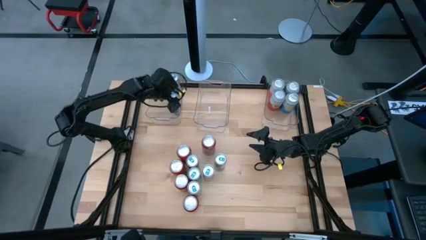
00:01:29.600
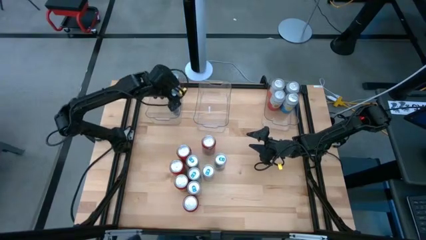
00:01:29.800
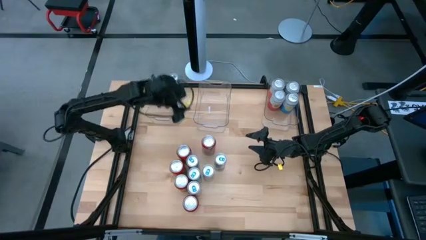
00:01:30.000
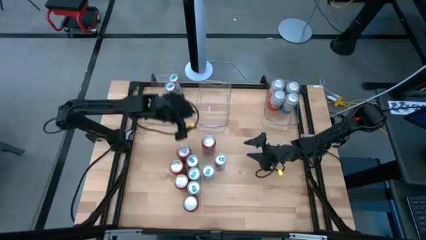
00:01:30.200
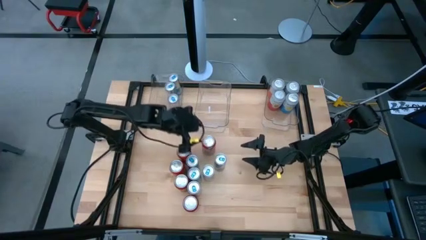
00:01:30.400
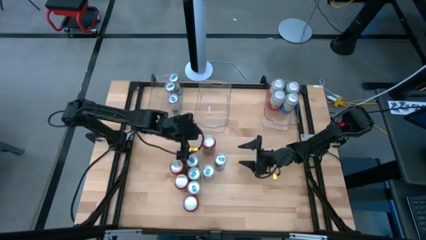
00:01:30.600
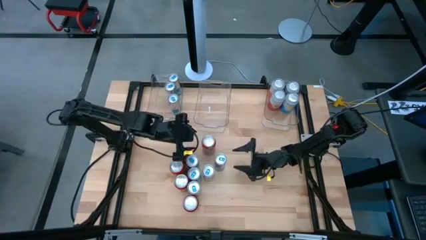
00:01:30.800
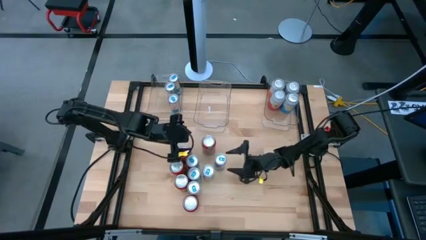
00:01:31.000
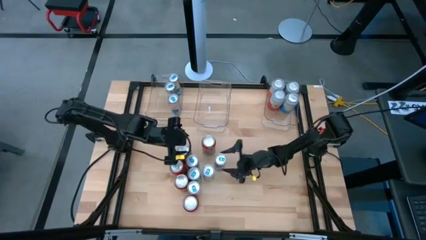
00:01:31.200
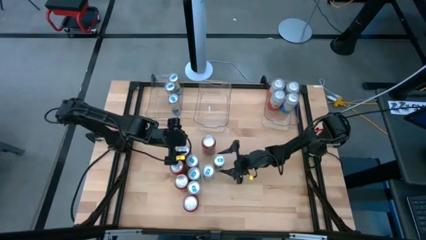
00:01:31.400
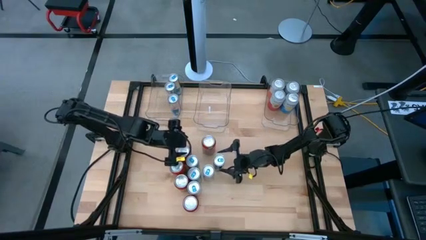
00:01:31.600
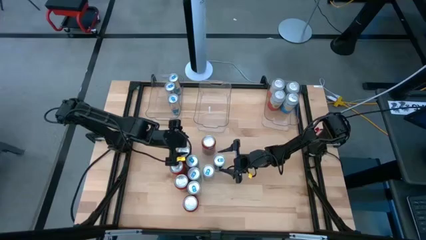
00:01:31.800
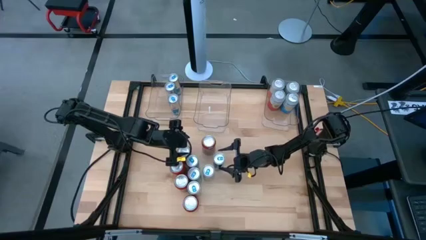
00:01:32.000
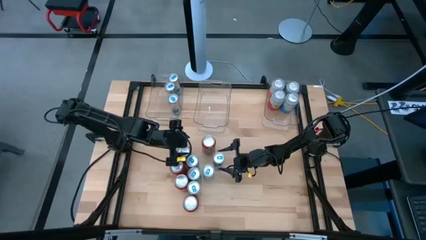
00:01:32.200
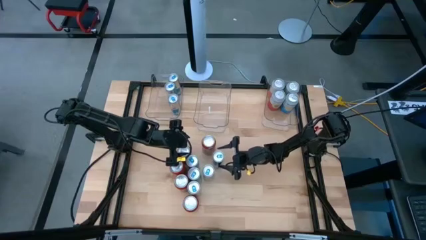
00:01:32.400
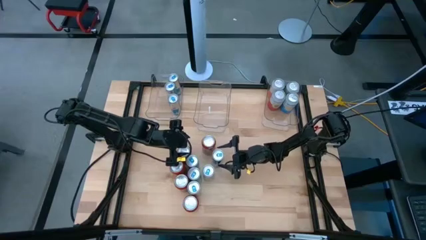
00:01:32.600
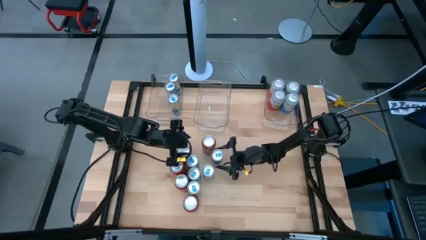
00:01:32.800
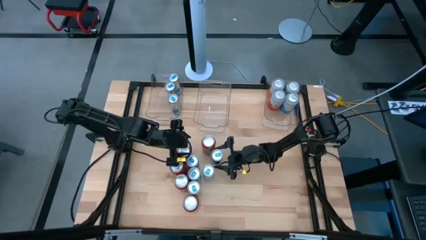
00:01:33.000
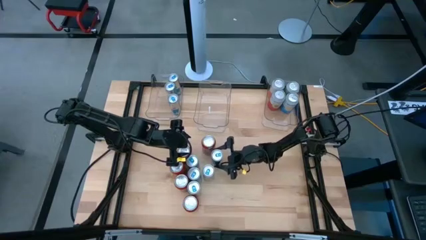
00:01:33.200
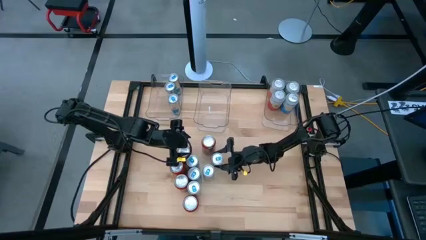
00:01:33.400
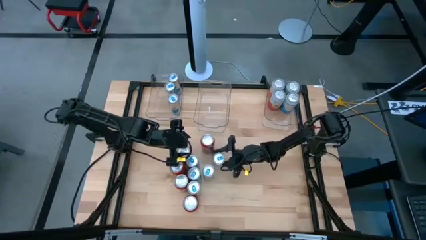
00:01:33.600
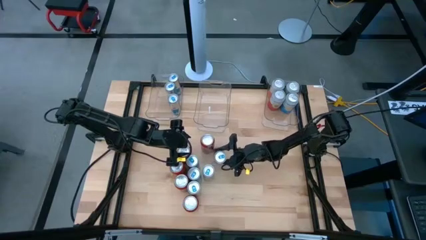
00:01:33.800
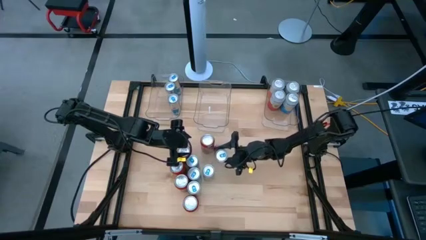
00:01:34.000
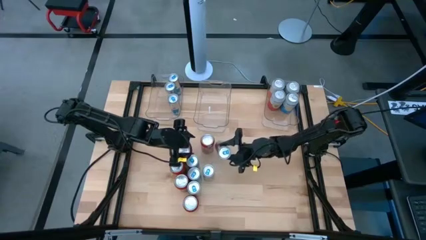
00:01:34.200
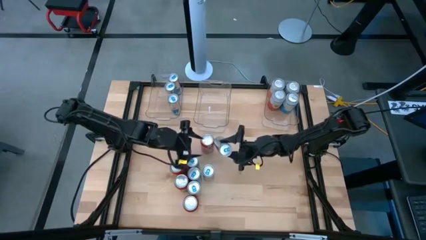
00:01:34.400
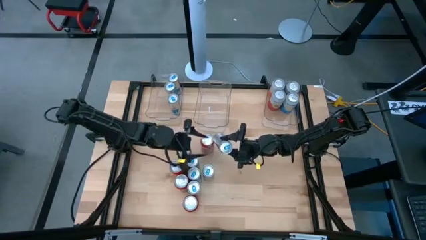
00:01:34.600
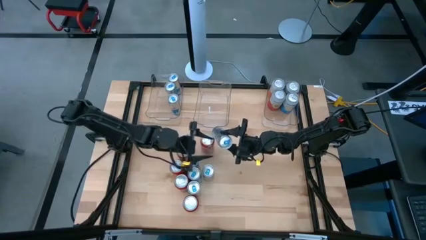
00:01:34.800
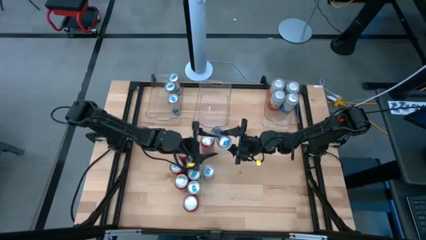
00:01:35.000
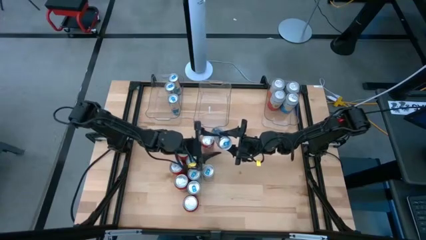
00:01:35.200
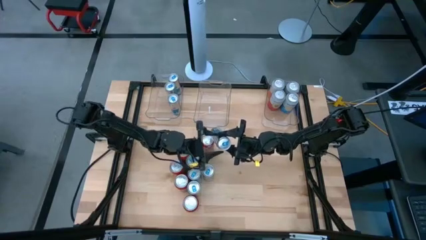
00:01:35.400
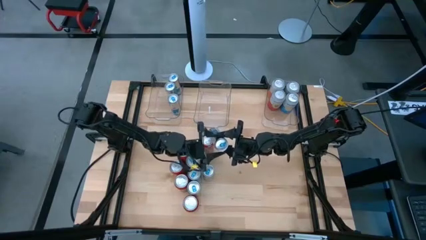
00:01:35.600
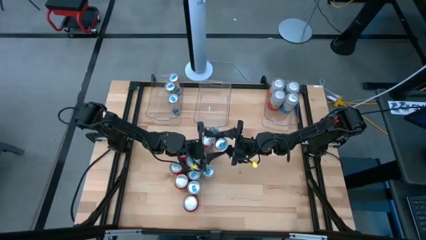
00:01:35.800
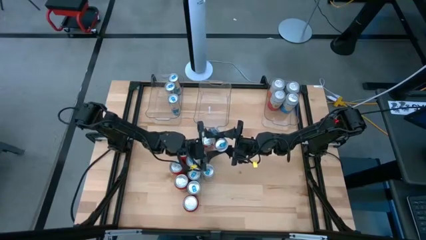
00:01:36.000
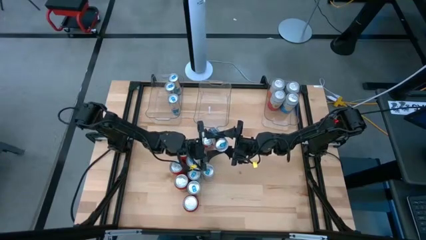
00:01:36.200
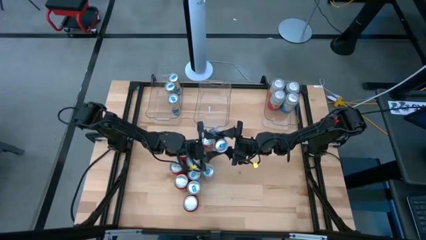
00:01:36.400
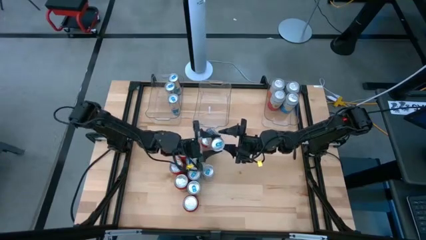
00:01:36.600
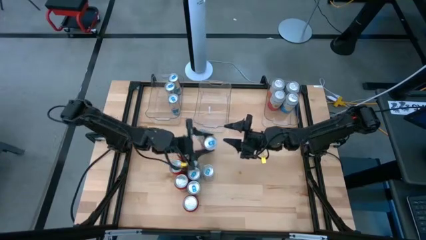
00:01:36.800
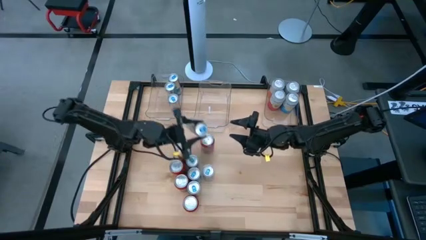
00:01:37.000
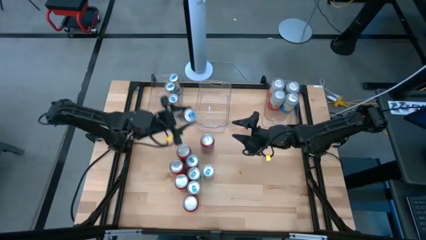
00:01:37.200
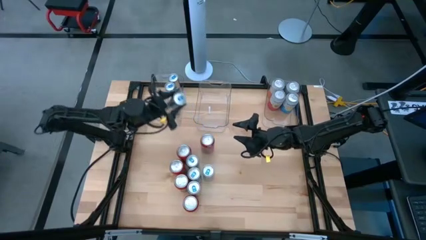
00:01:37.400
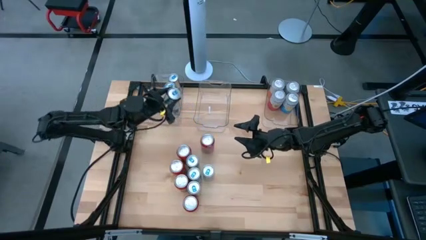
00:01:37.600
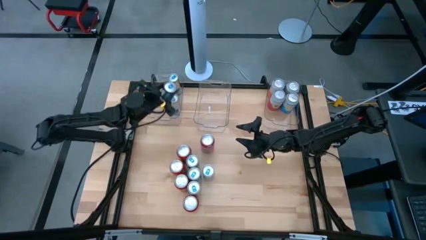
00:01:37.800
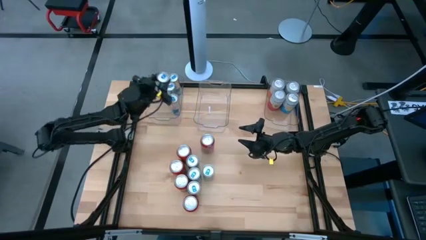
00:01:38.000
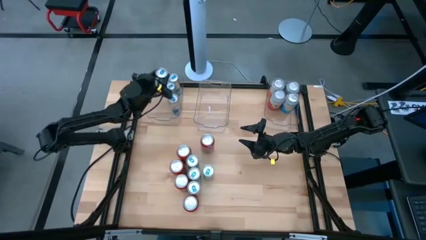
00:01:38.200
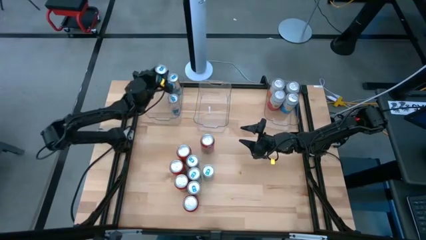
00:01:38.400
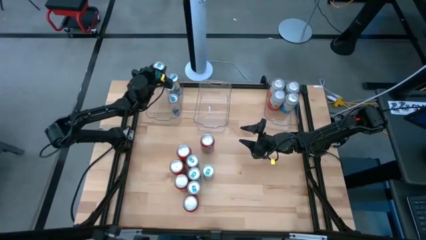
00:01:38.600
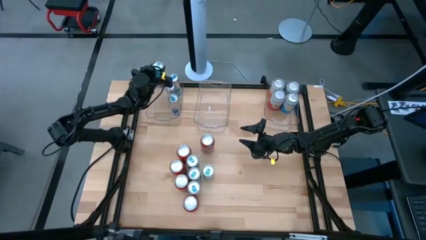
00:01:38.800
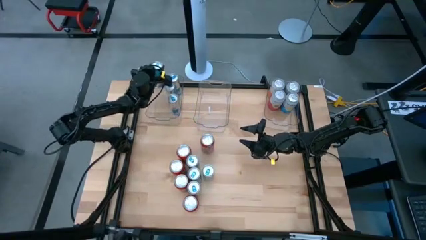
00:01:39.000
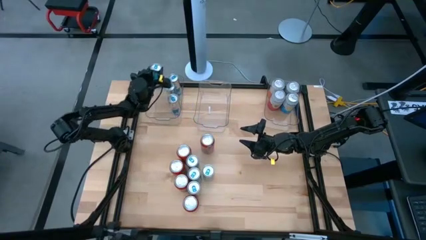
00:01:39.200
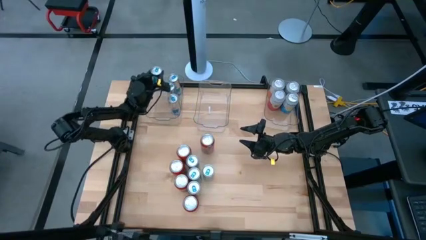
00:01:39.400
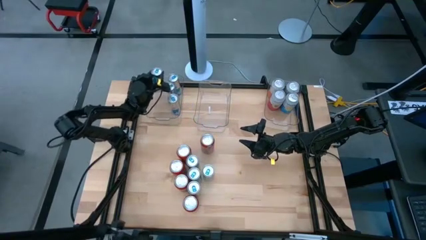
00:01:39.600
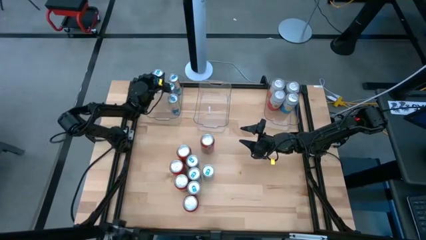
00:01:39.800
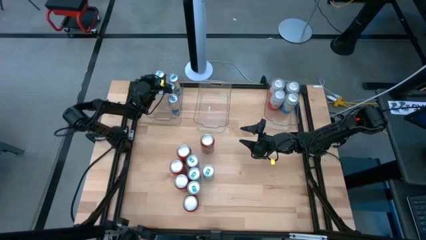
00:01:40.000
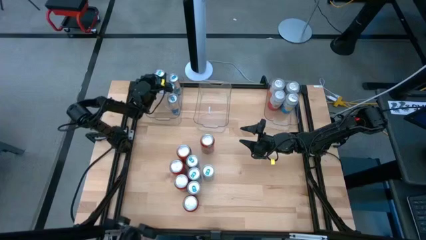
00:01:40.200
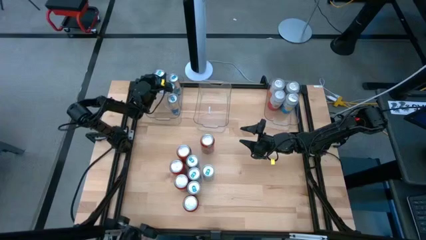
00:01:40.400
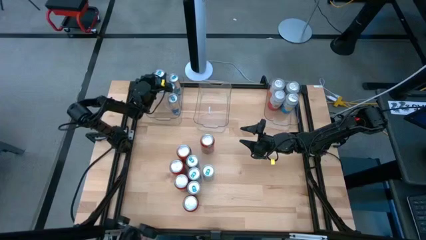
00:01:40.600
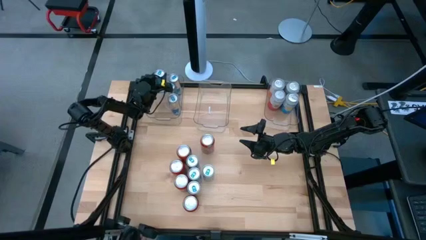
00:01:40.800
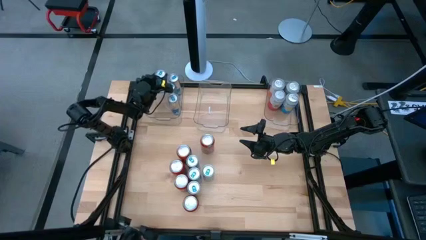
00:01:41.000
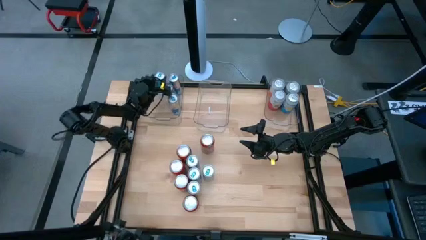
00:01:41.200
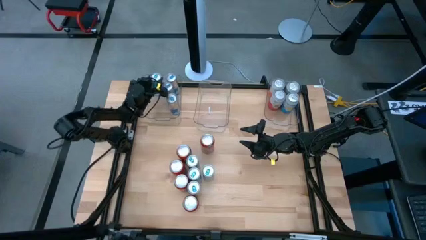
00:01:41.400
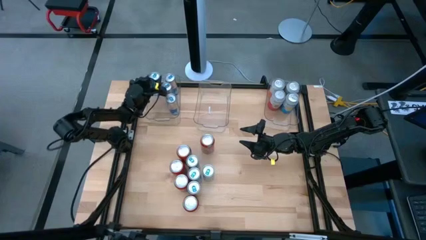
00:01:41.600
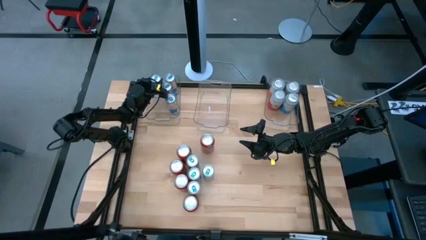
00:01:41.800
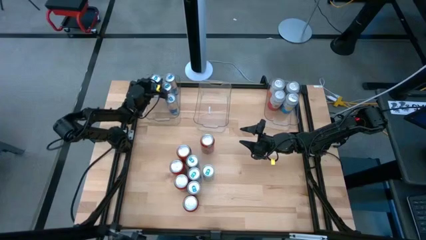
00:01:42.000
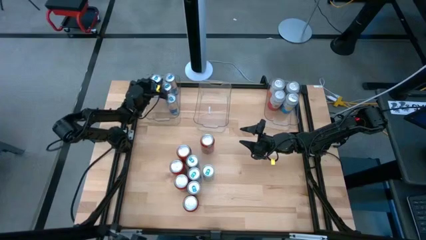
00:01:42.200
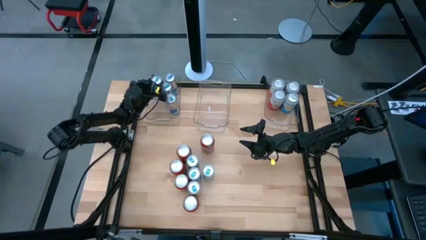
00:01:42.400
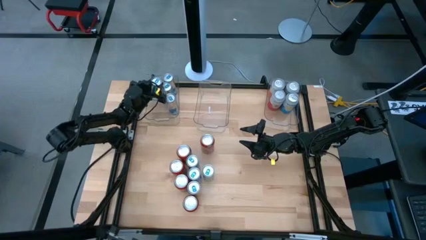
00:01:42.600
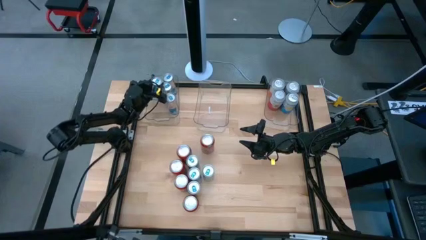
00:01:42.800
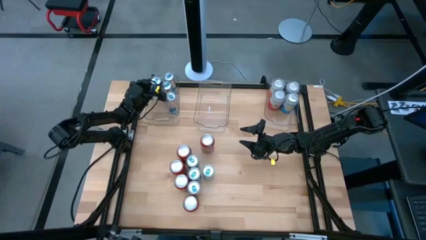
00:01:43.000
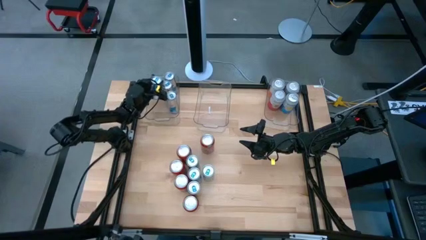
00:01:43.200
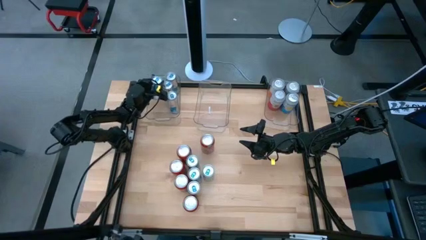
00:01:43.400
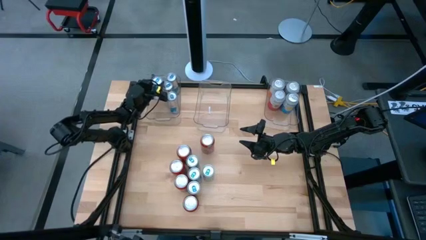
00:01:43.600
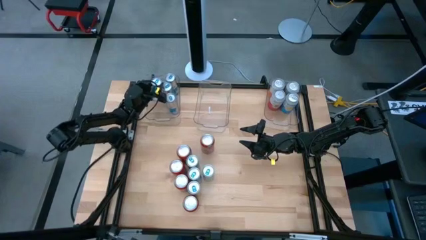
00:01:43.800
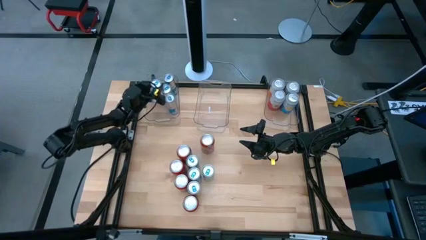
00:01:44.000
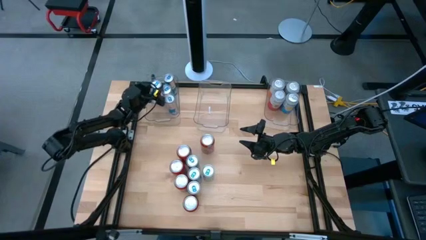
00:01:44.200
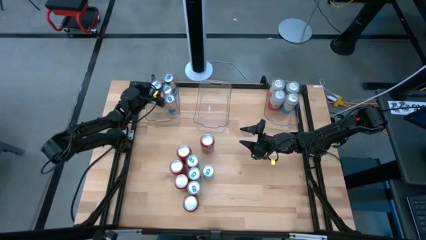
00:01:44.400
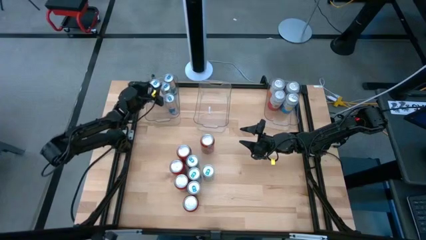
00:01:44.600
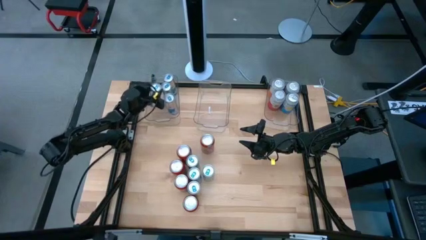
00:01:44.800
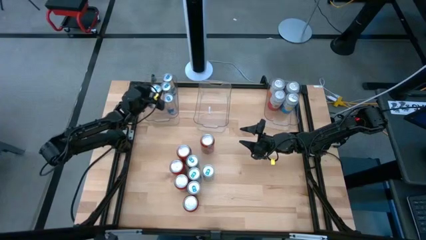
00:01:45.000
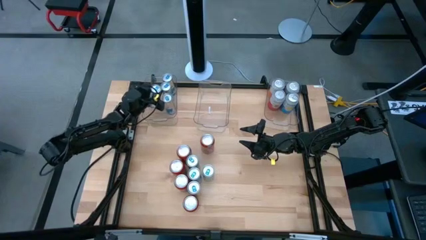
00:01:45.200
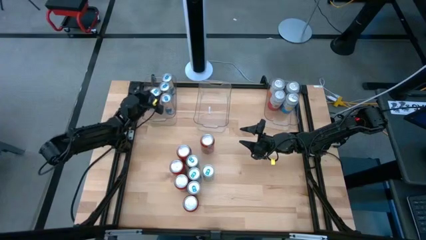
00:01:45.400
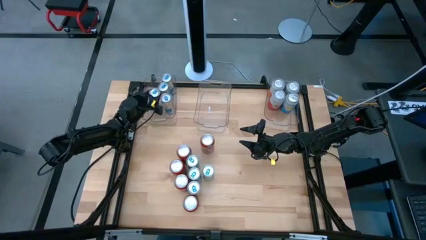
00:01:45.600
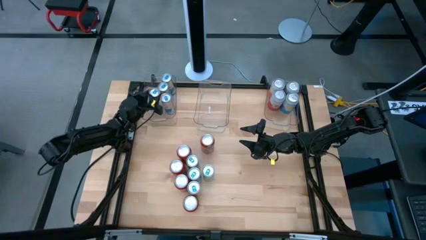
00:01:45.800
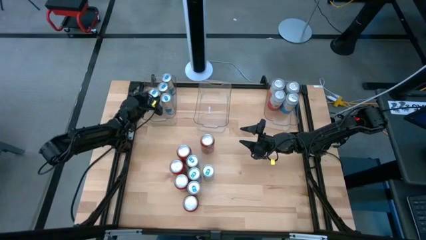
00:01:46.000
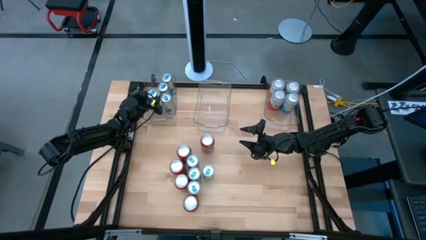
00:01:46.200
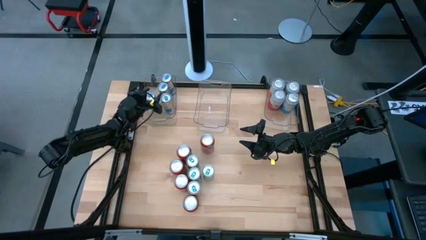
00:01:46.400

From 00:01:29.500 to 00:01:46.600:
Task: Sort soda cans
Put the blue soda can into the left transparent bin
